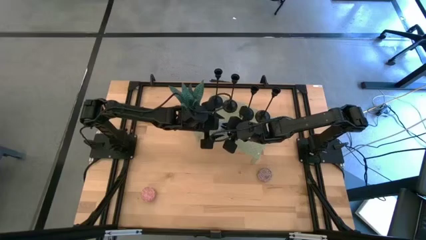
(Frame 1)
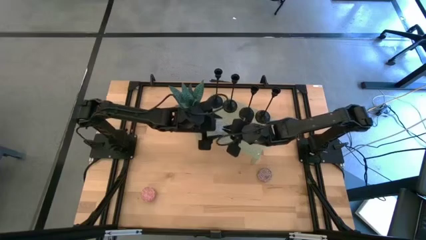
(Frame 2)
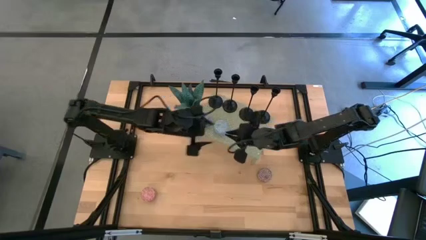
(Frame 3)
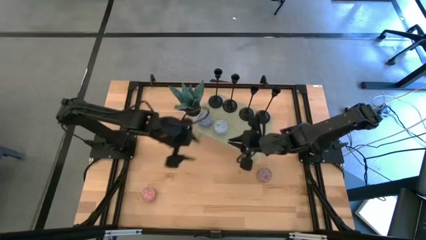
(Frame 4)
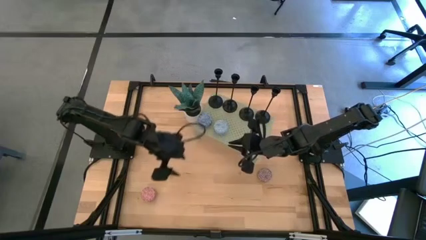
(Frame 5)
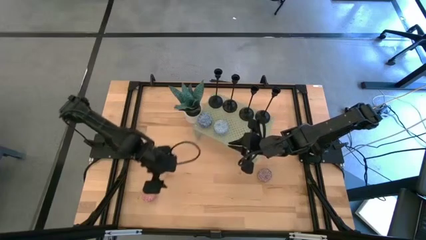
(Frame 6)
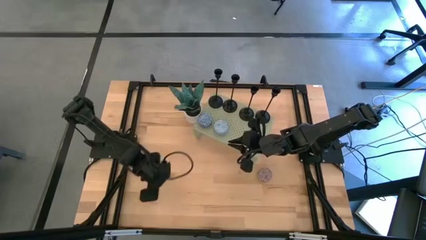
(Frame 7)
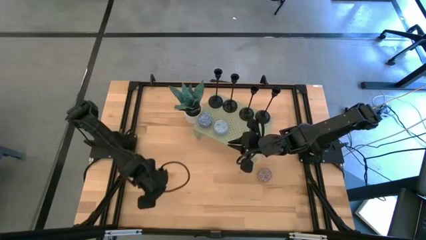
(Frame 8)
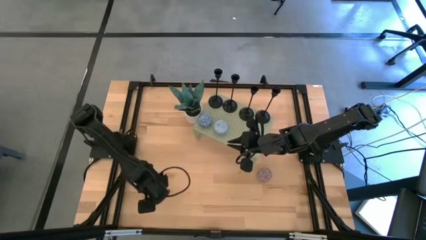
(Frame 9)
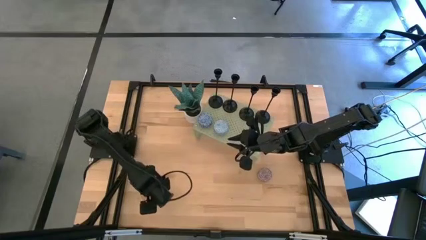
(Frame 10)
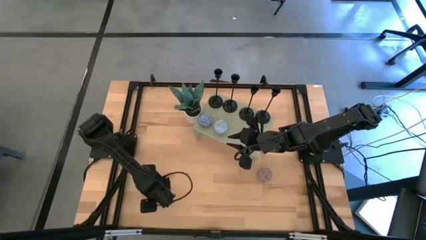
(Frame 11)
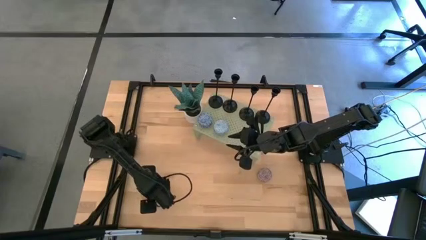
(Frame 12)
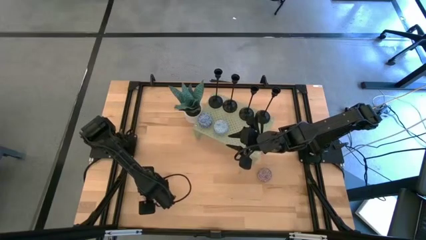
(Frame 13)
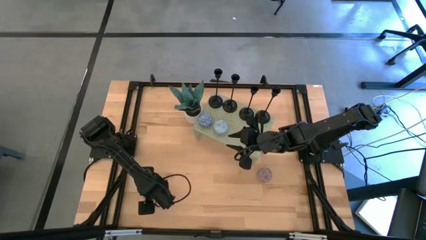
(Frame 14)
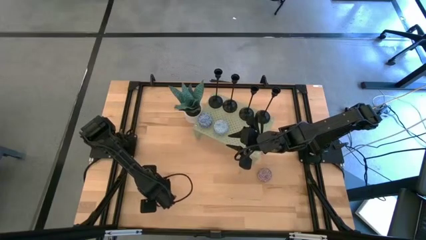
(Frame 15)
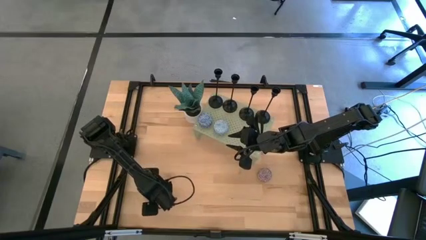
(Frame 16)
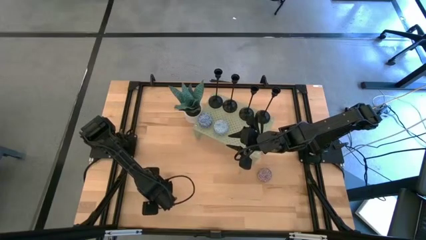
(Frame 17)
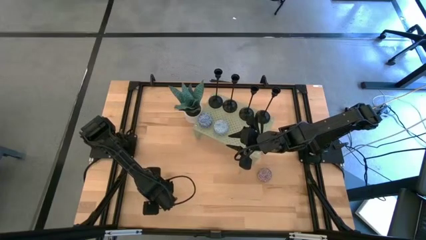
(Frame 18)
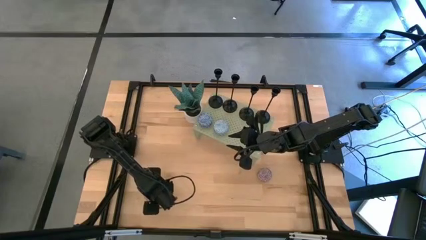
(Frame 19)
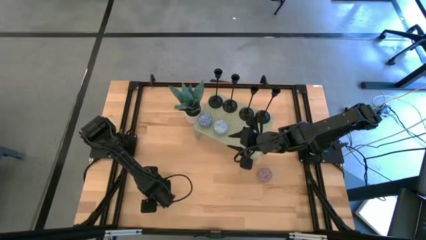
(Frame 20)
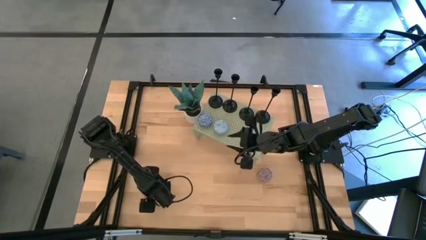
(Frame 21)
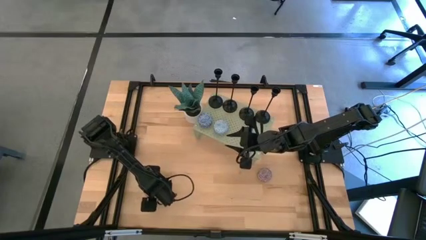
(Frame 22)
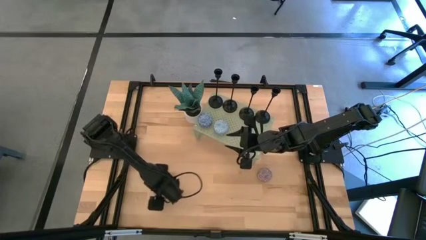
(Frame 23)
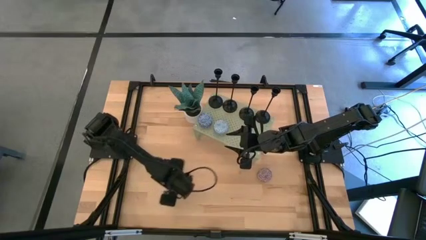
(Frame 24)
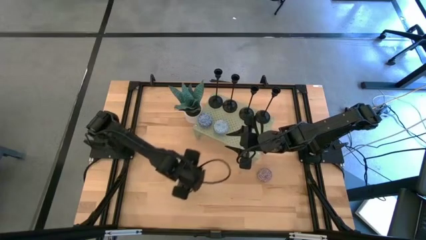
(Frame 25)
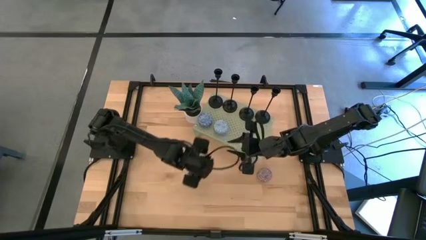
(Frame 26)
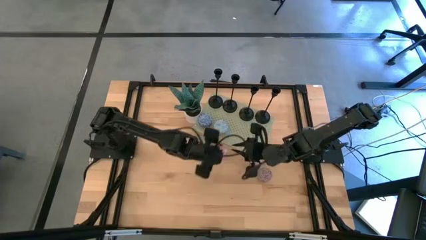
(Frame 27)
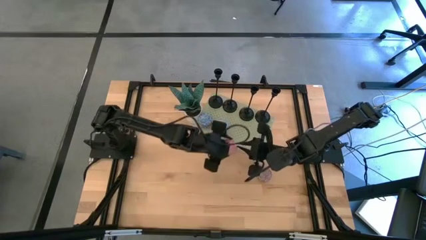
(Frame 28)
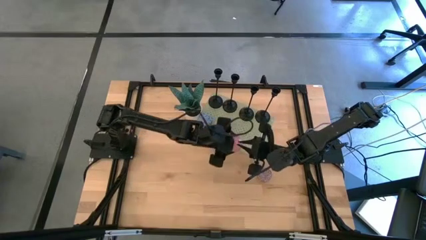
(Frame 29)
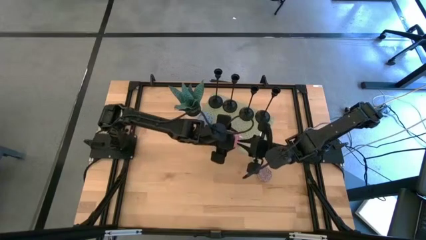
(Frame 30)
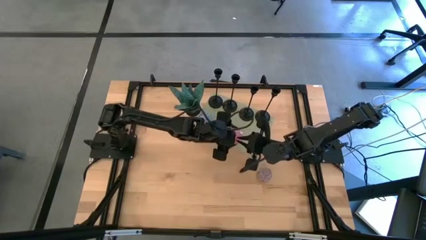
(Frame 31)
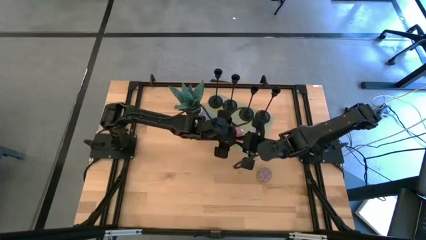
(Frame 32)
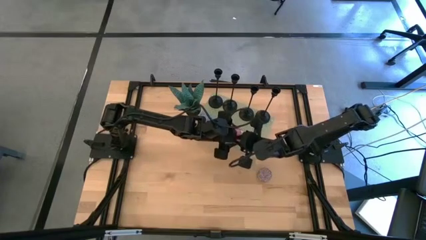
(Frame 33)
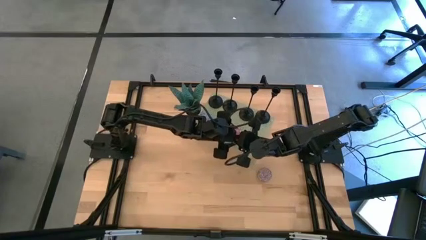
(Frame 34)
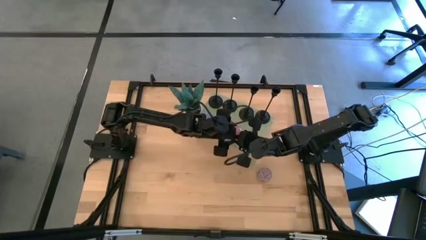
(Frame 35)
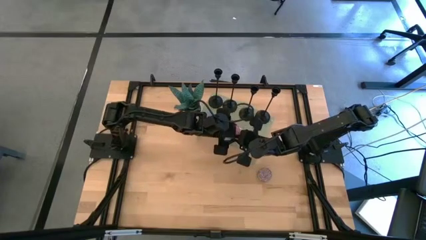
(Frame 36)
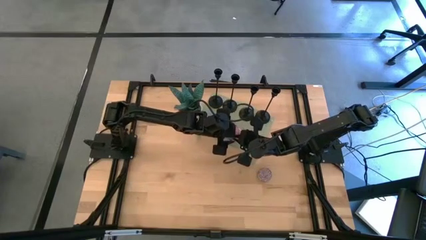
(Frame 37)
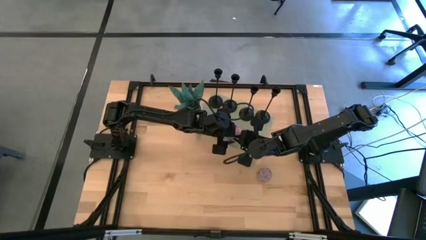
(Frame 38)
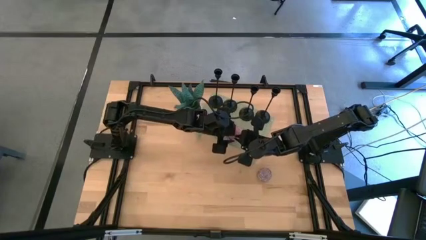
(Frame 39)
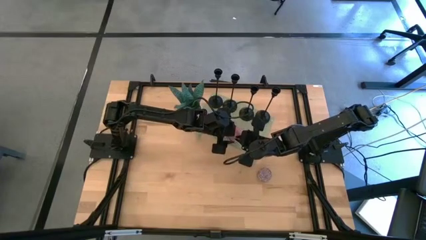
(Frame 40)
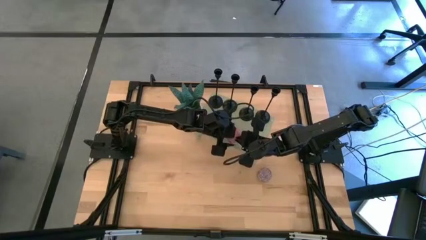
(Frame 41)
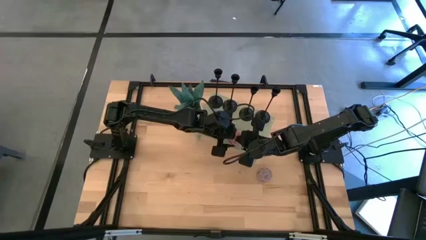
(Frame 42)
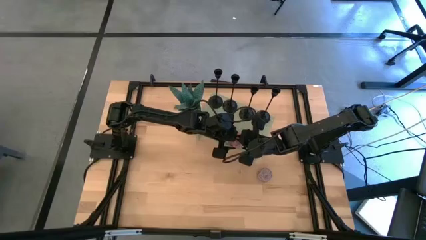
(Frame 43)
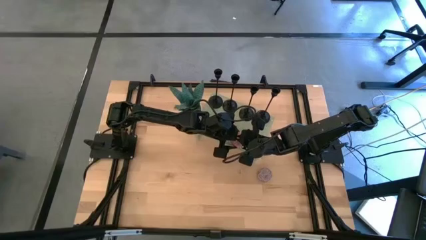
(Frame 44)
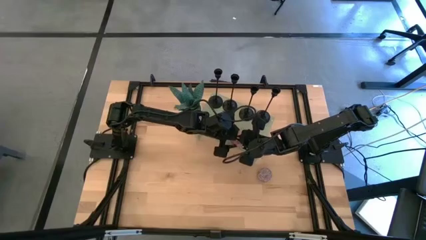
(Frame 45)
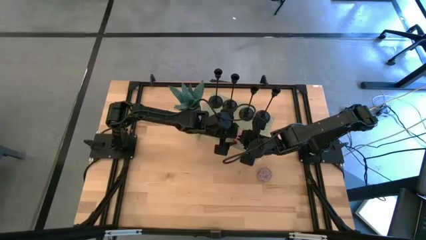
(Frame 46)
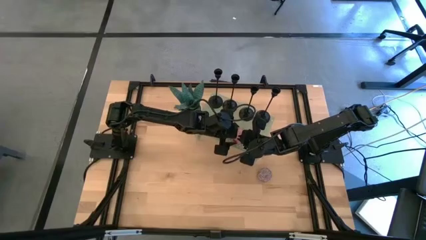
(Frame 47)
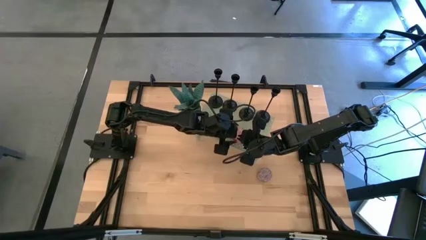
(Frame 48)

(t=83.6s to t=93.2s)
Task: Stock candles and holders on shelf
Align the pink scented candle with the other scented candles on the shelf
